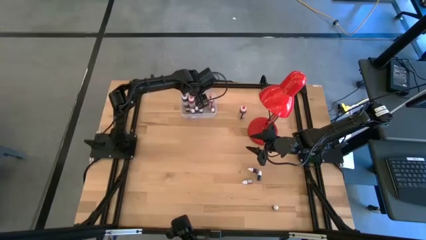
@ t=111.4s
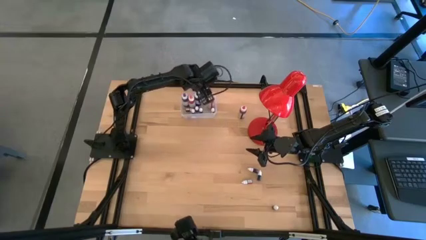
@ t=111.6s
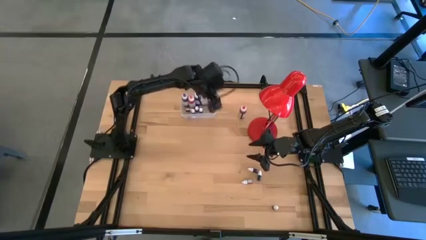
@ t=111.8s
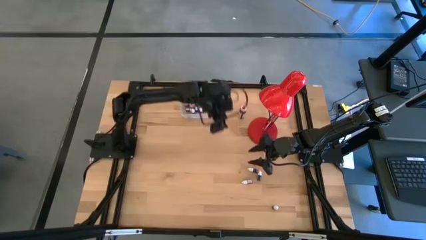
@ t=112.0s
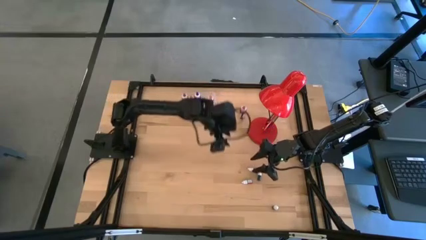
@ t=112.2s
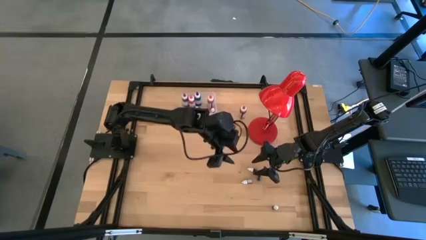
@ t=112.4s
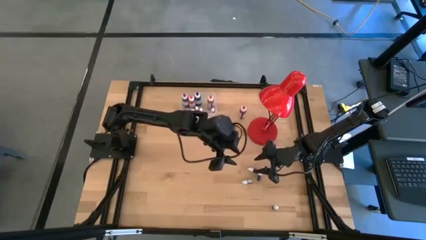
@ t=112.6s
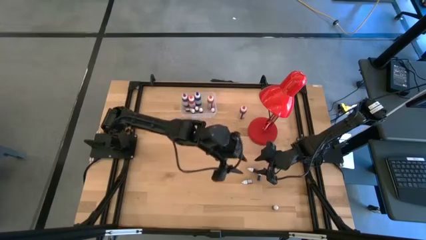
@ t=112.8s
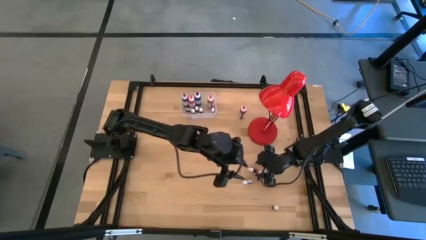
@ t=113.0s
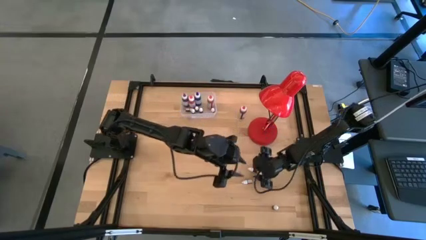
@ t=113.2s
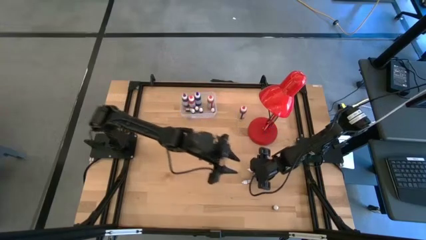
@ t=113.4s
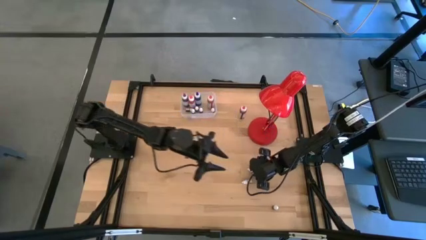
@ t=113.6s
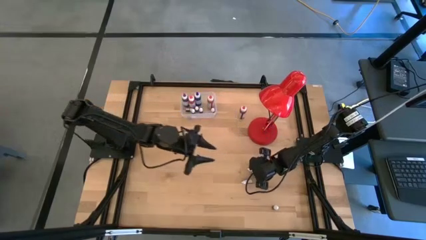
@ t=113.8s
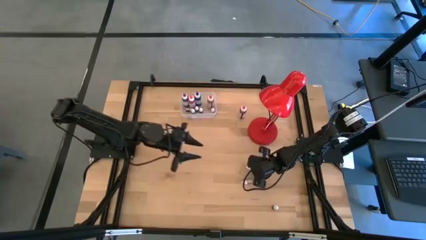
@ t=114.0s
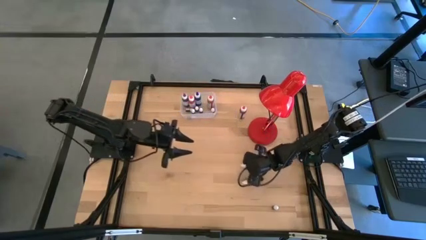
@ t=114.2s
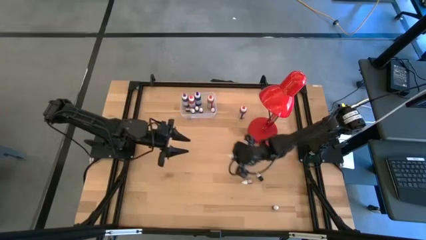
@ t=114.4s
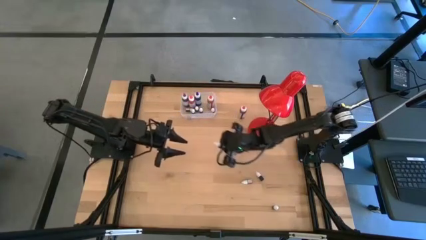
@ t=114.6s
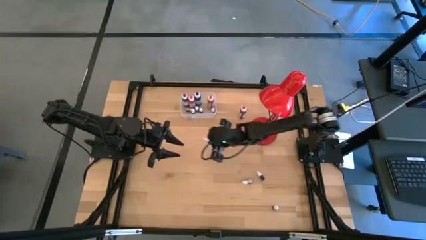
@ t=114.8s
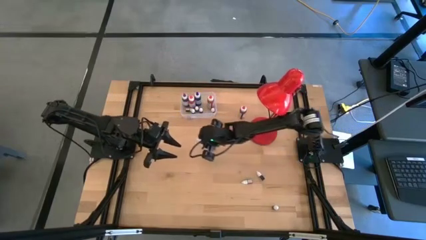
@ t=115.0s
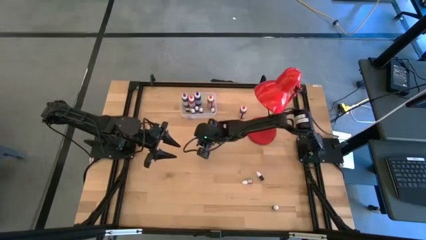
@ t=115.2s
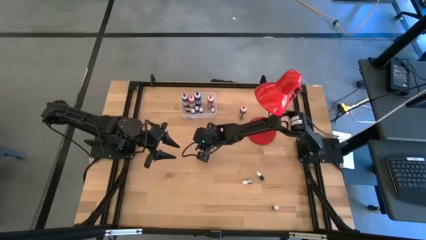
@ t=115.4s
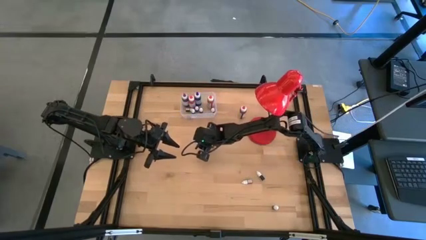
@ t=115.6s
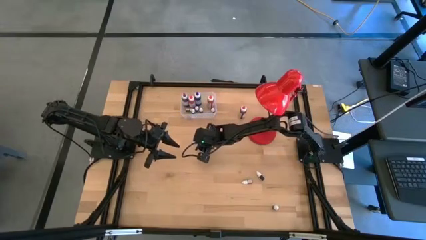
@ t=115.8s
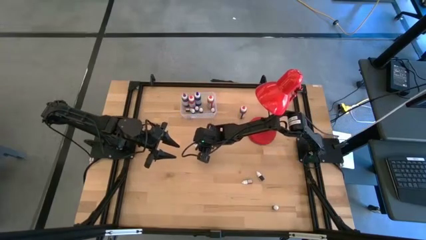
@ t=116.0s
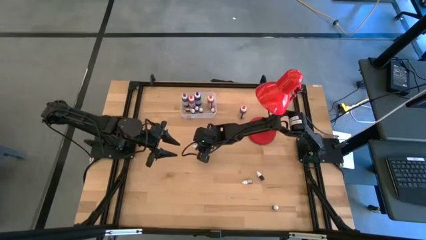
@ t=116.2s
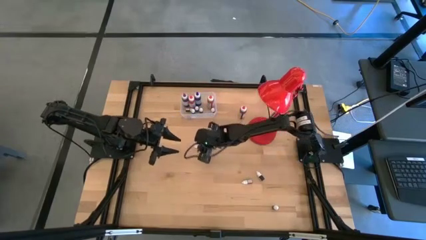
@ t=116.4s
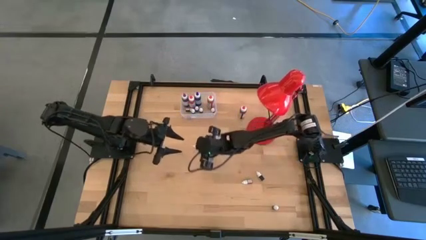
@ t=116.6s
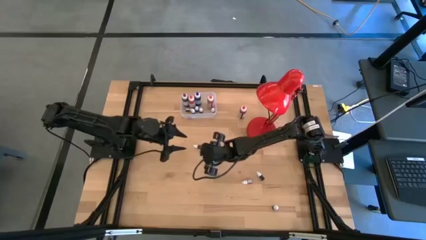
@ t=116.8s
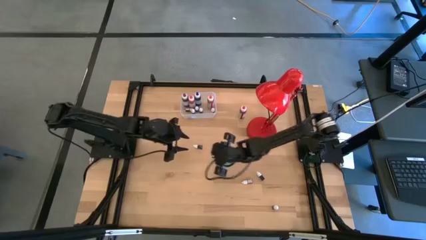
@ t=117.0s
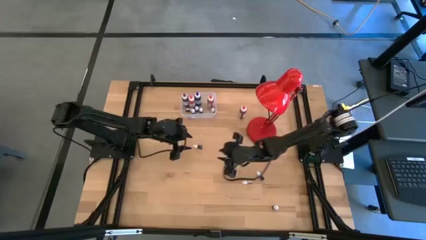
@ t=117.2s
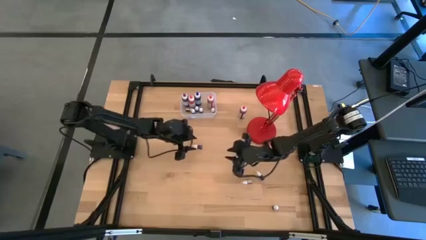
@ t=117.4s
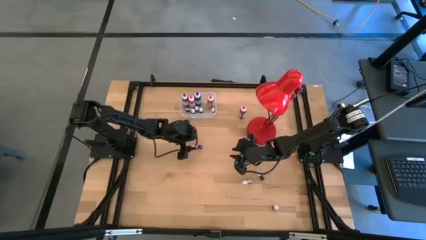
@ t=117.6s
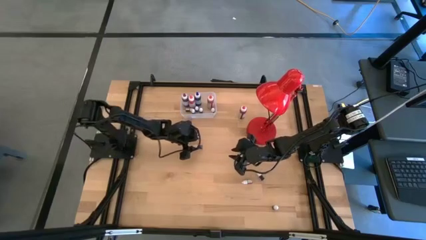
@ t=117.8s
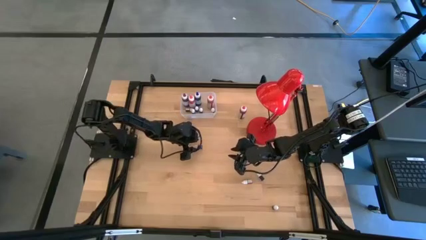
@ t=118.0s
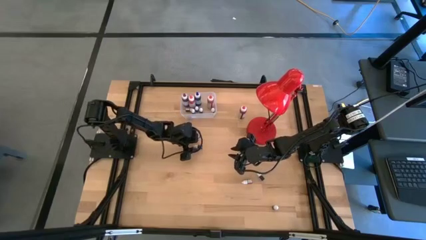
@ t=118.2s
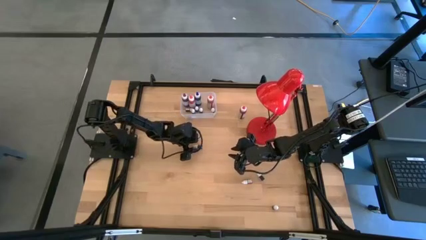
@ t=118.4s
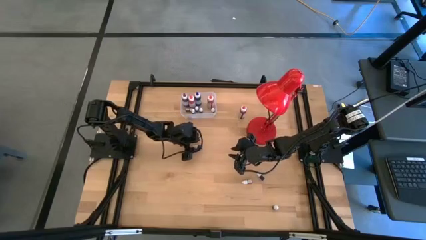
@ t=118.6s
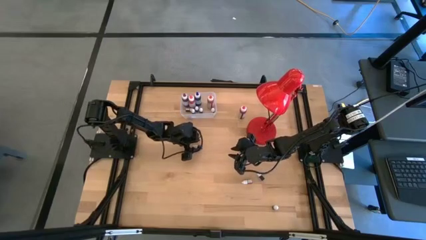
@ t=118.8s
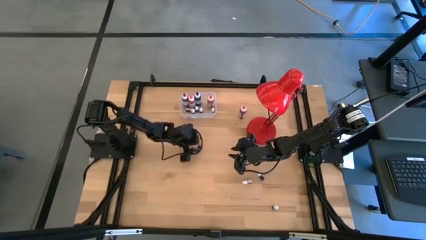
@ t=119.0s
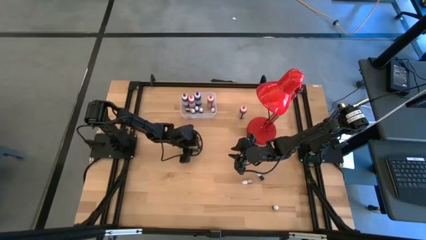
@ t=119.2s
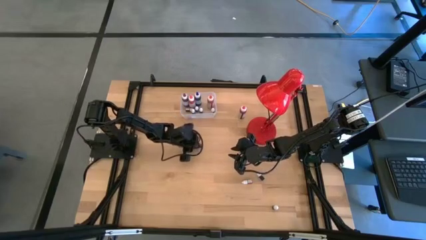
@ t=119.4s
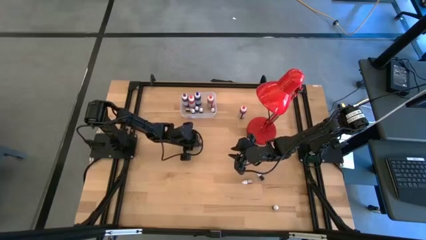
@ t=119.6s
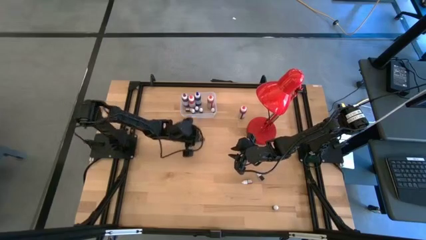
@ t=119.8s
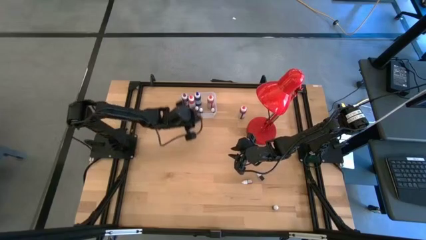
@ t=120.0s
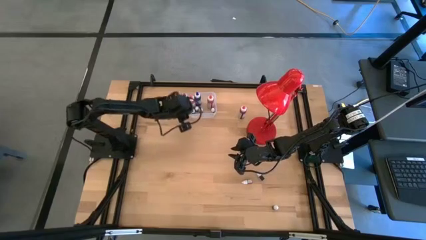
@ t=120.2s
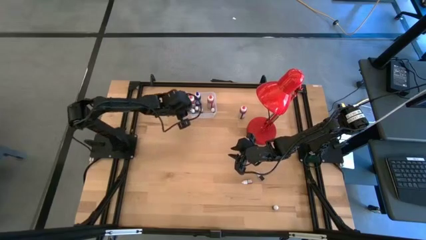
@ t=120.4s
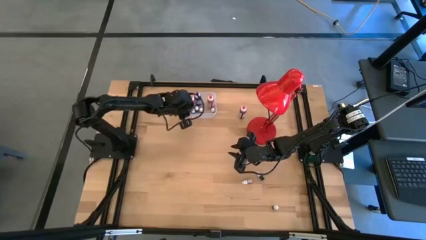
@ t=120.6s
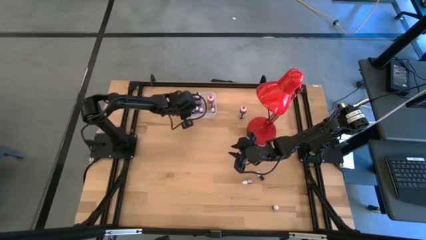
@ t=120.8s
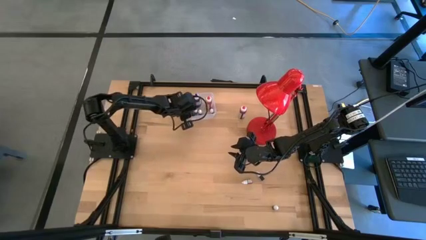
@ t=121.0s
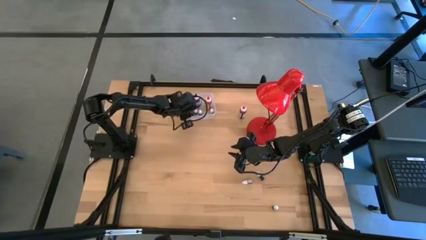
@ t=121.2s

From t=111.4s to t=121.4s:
Task: Pick & Place food coloring
Put the small pink food coloring bottle into the transparent bin

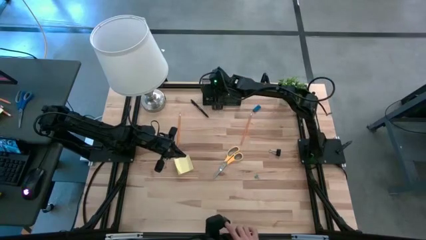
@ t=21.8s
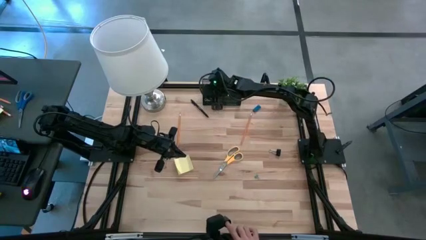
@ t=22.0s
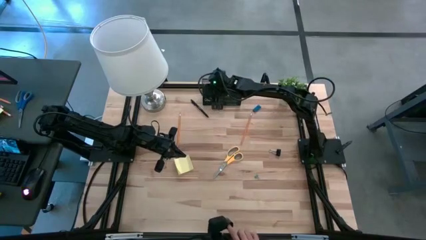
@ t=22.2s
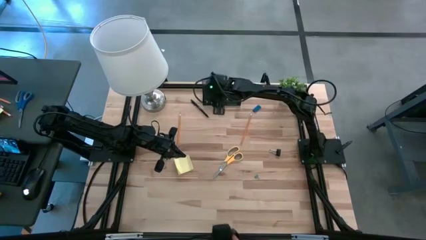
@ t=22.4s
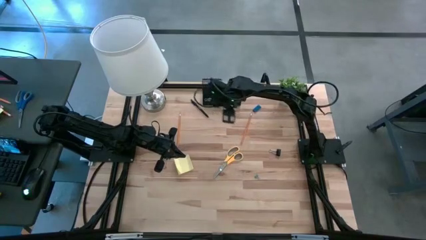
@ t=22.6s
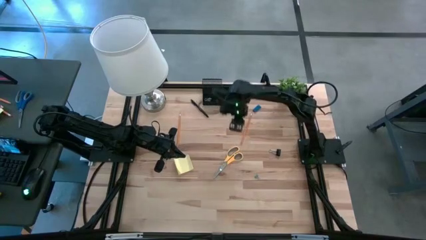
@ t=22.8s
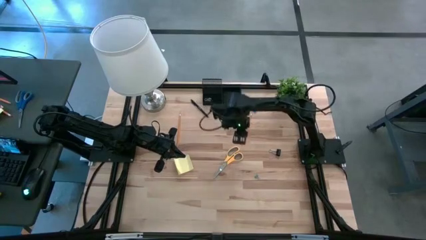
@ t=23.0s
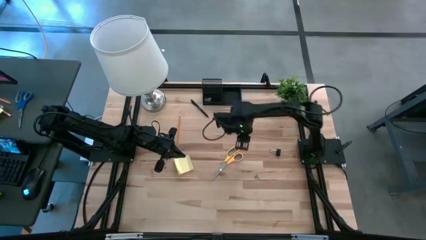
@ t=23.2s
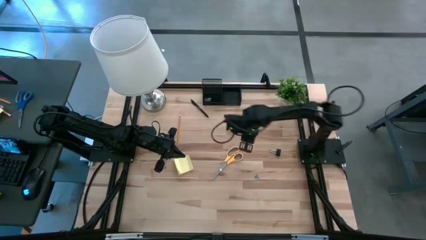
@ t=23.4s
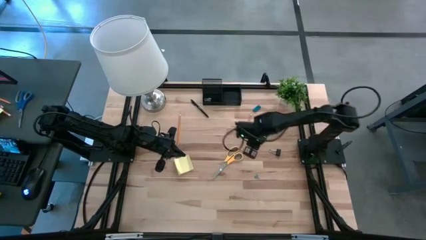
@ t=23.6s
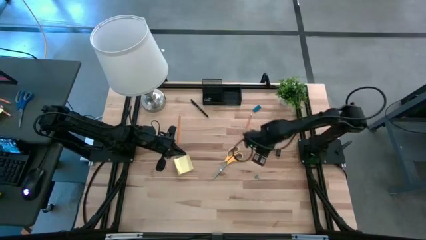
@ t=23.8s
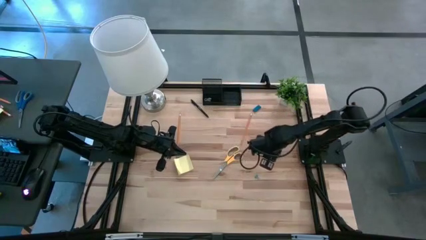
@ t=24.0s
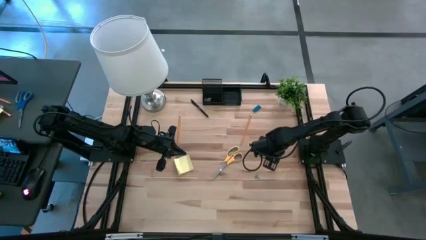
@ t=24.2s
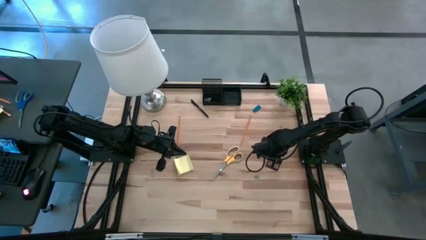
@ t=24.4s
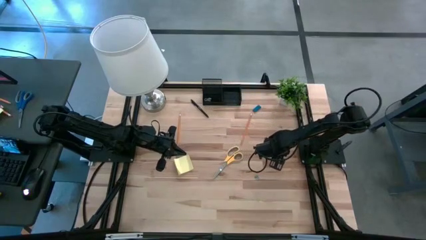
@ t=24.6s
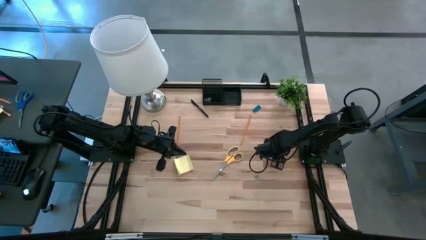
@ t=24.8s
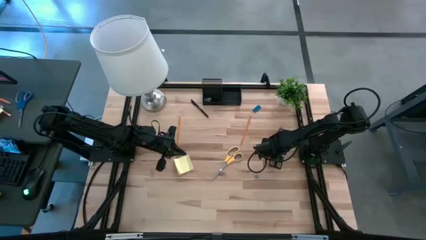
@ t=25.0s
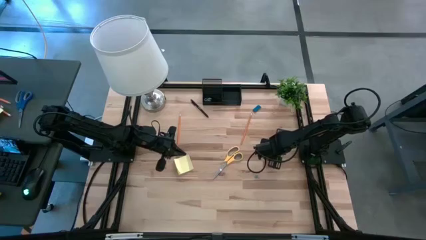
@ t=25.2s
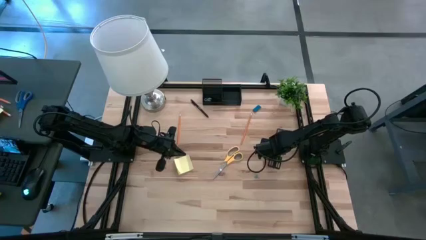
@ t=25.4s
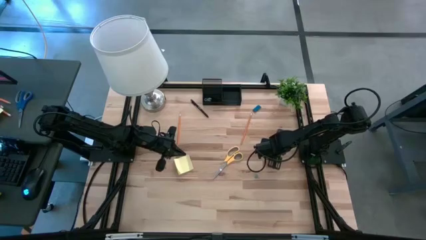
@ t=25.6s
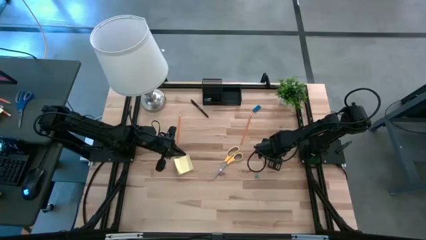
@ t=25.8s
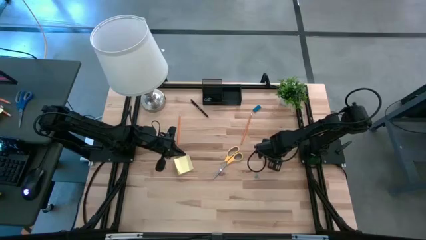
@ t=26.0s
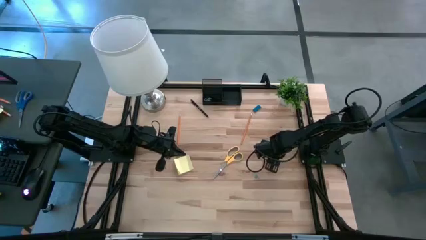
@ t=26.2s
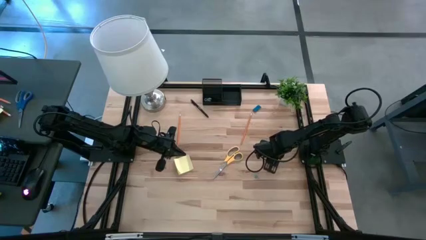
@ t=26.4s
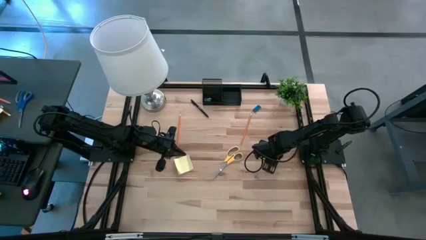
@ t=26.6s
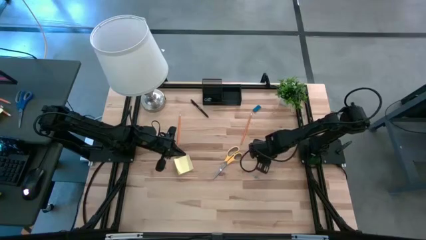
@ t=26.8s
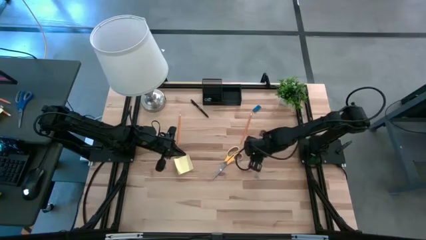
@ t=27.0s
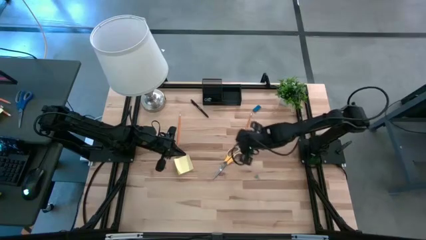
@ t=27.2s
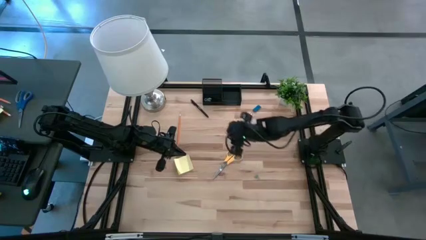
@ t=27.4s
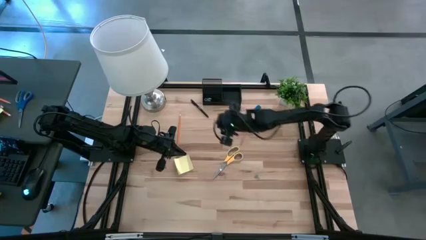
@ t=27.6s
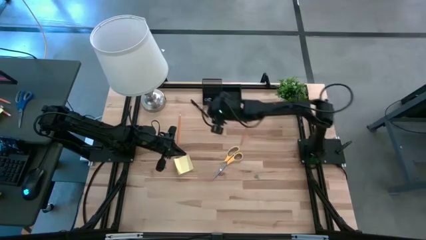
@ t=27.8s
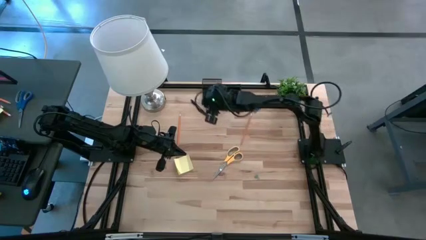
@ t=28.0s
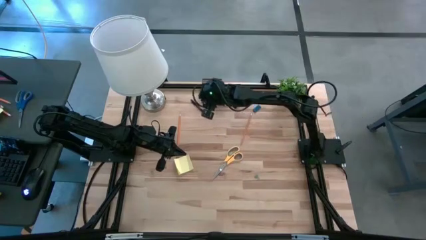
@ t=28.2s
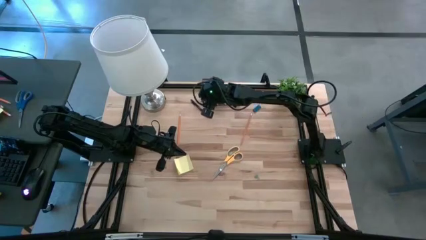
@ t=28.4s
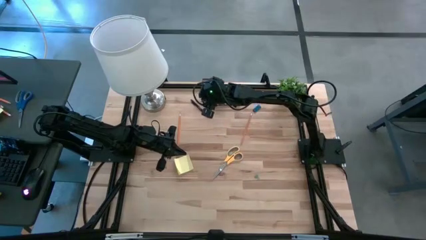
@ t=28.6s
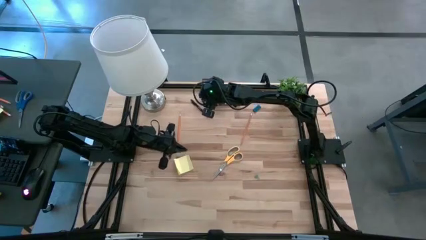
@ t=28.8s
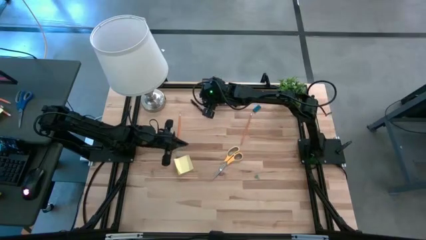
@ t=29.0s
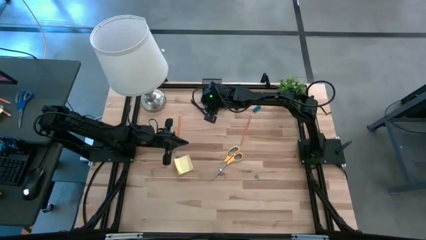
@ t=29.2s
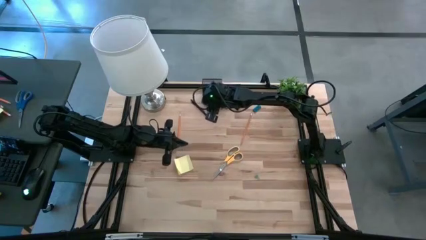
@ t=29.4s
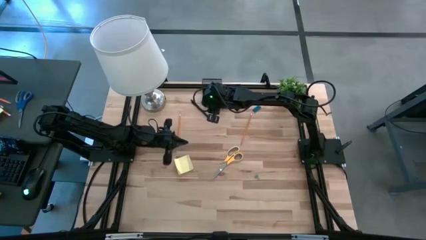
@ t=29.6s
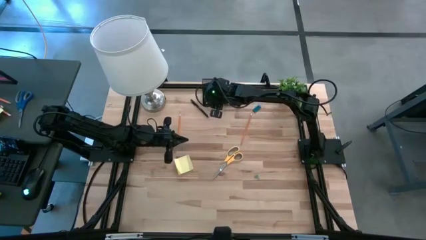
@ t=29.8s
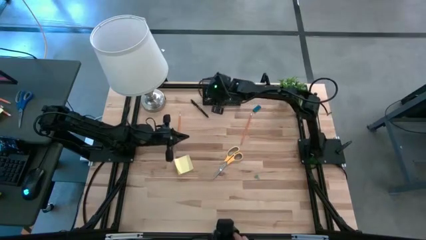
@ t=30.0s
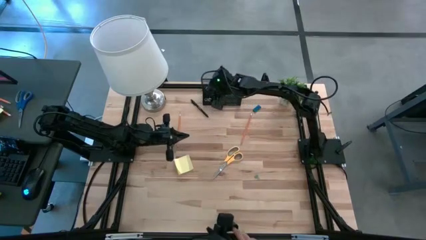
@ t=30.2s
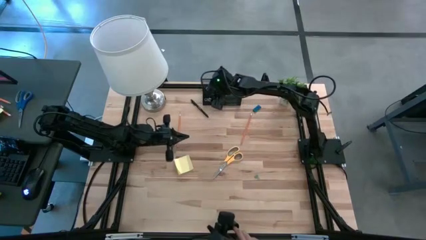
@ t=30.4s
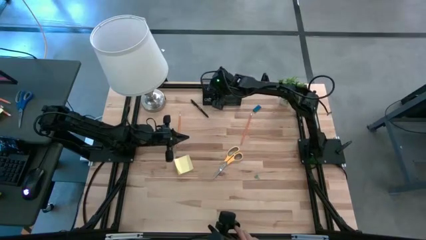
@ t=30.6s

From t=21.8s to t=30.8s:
Task: Pick and place office supplies into organizer
Put the black binder clip into the desk organizer
